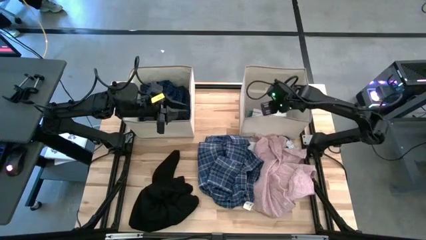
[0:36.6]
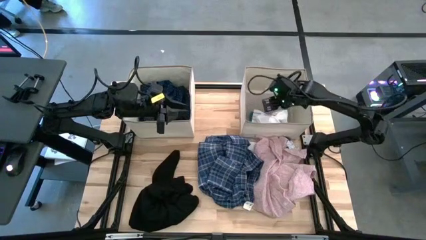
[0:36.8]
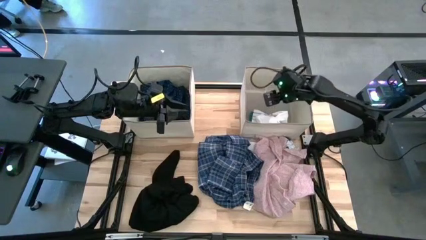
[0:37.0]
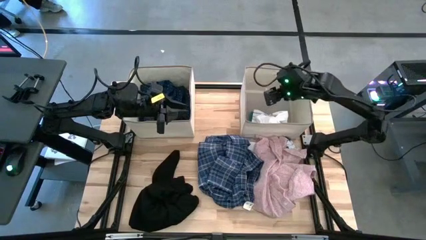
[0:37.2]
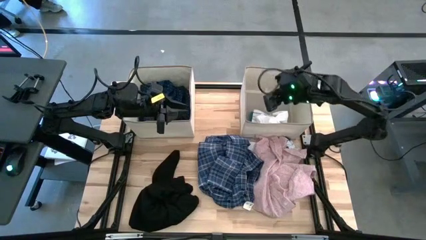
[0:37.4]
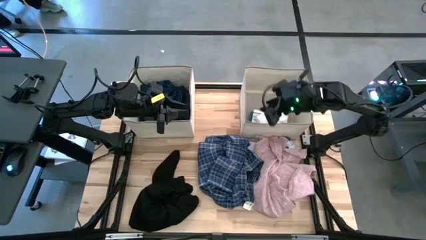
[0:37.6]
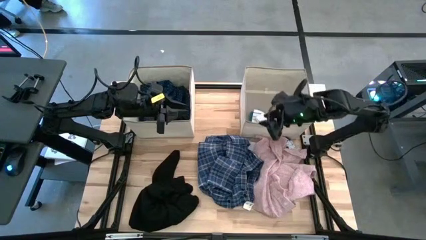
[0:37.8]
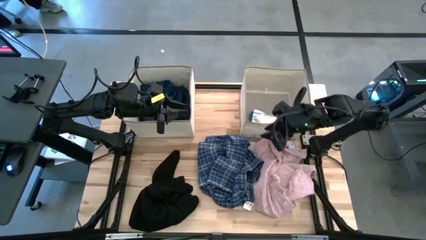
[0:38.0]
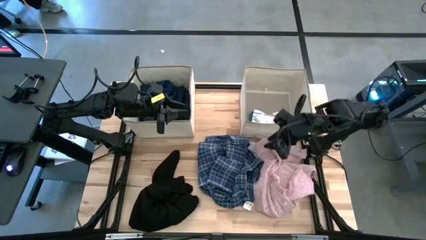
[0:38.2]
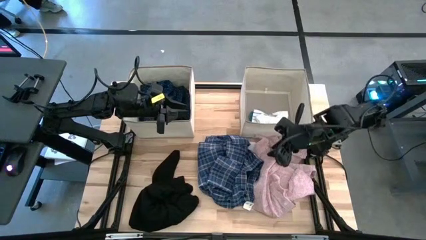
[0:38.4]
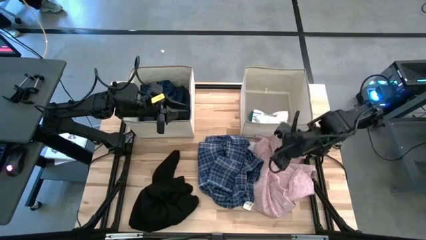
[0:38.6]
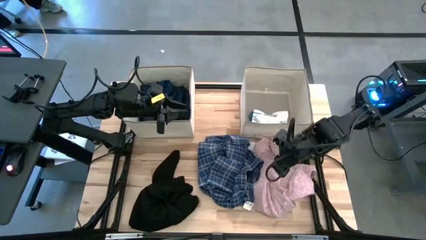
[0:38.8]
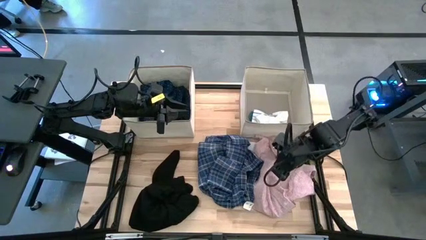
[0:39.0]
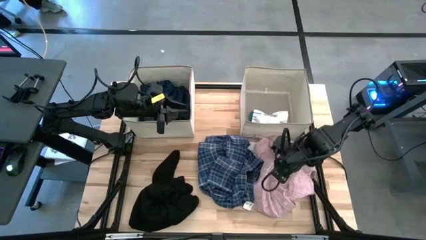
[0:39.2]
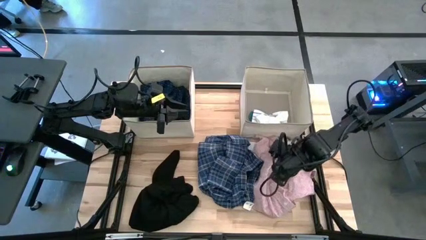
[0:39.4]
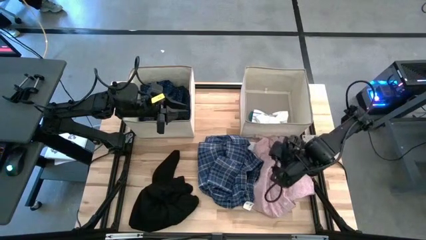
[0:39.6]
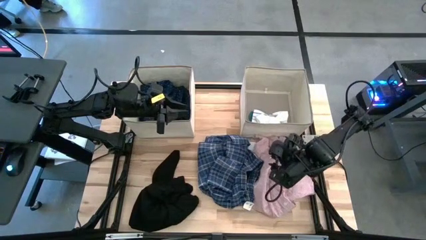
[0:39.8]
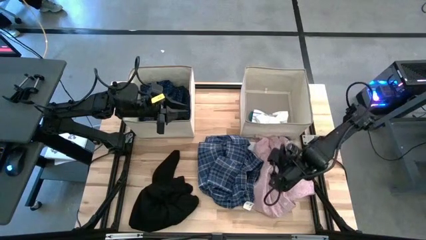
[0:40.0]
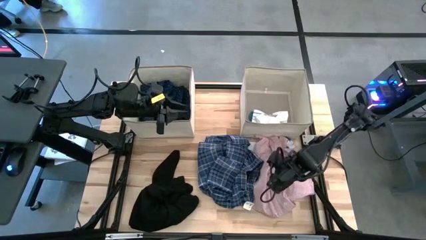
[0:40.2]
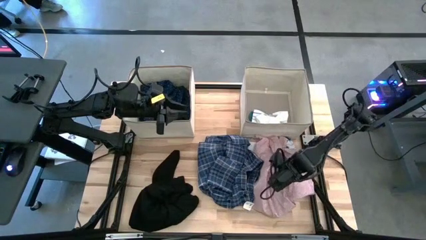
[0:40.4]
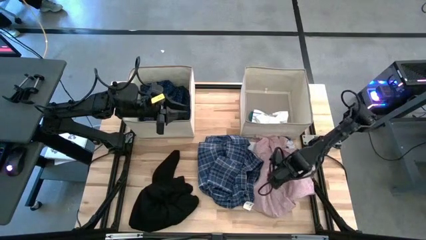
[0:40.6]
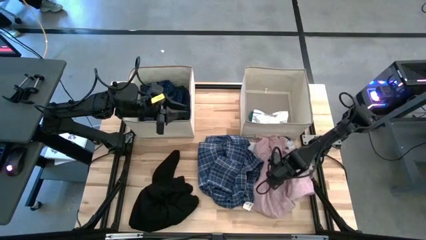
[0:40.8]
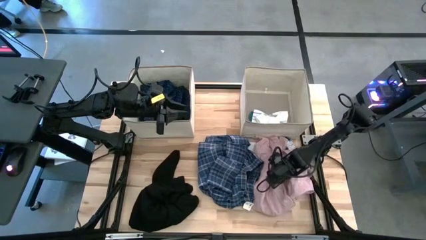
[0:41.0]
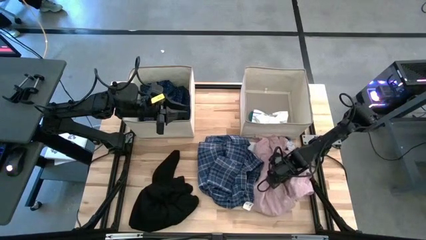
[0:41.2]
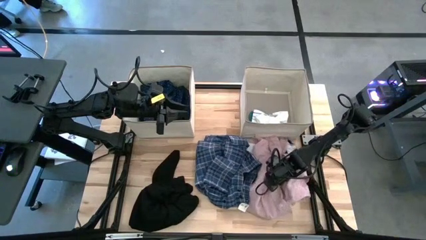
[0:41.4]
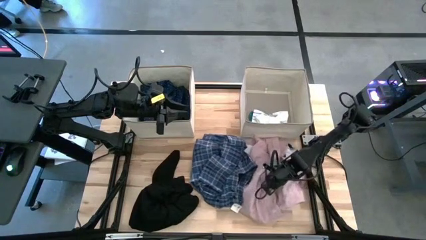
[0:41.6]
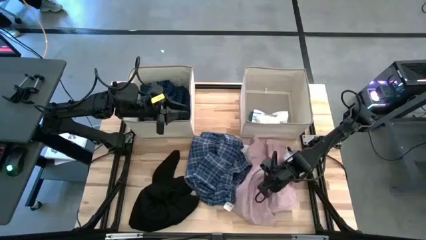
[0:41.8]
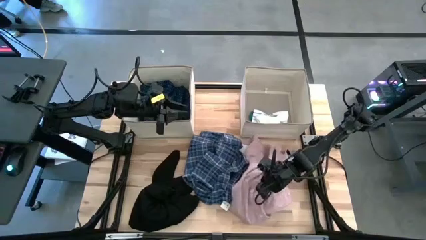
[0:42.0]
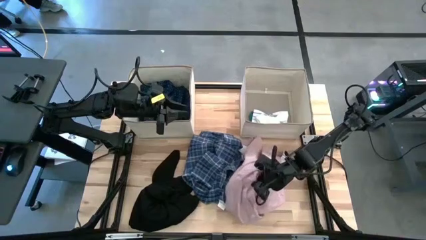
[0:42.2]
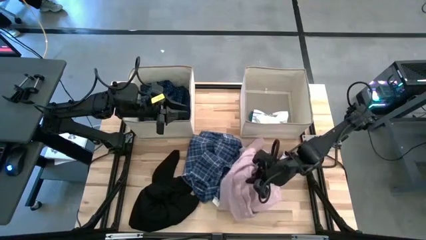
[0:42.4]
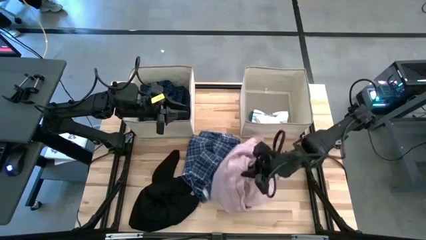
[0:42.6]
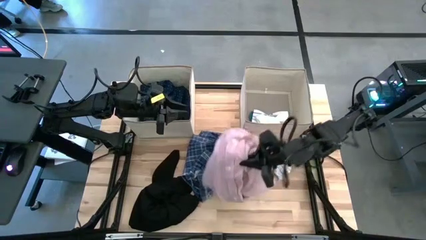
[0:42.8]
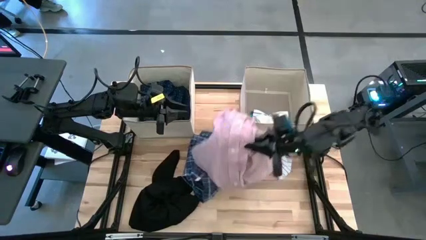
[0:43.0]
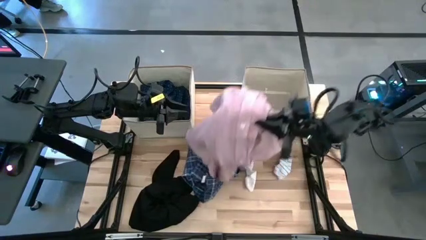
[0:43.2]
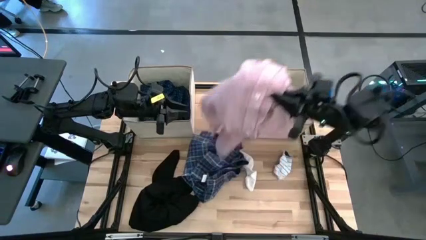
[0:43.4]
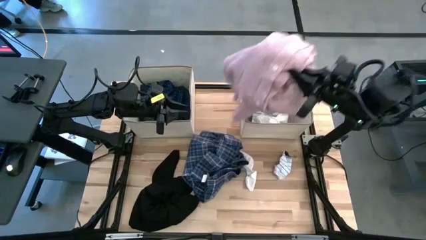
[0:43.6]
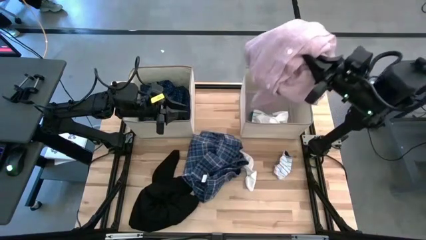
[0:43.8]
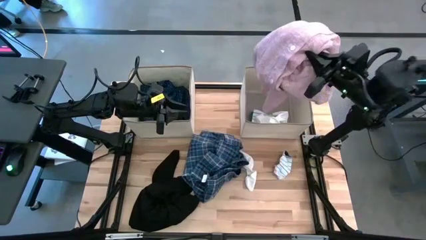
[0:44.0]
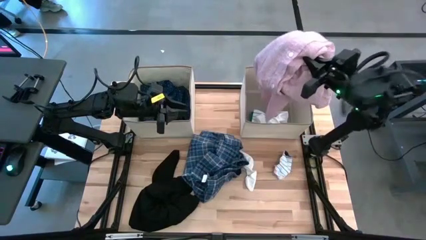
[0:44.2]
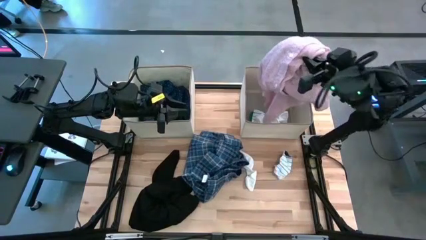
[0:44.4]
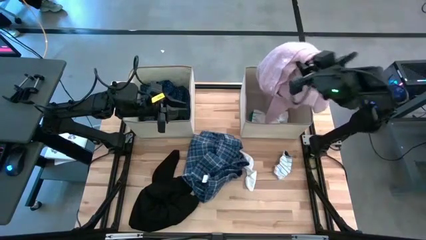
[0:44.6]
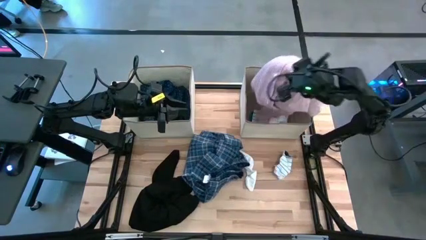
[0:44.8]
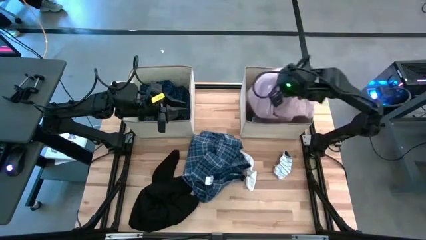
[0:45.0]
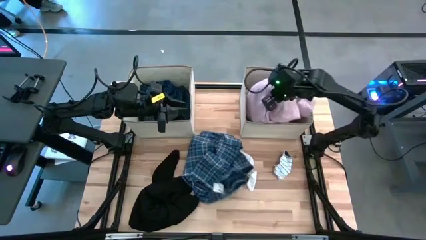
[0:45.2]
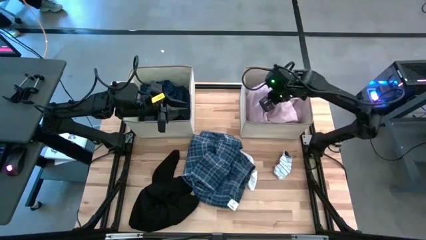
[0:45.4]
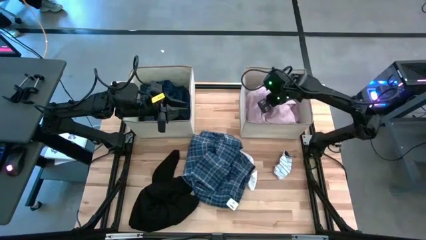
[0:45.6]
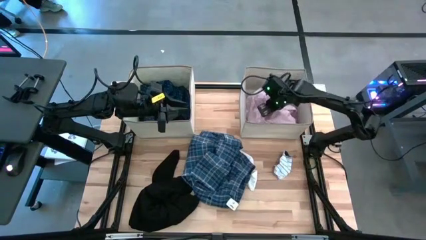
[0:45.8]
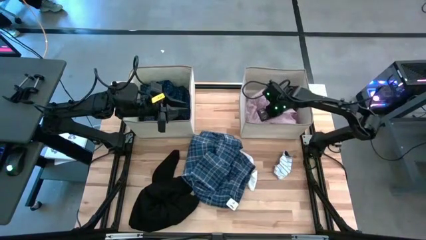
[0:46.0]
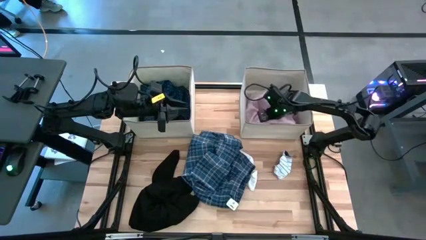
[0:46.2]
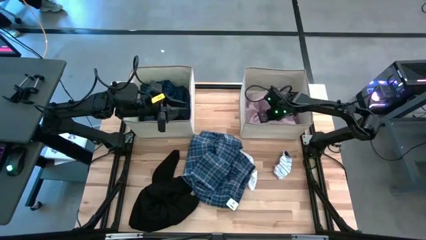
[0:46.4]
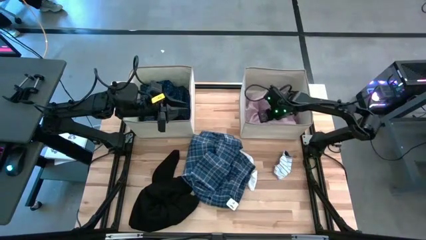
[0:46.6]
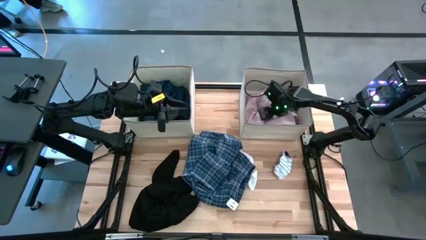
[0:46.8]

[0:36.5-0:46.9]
Task: Sort clothes
Put the pink shirt into the right laundry bin

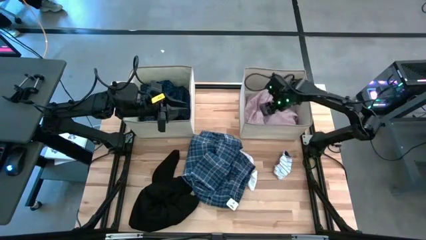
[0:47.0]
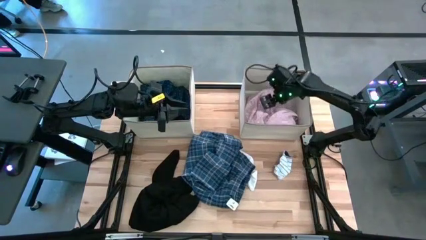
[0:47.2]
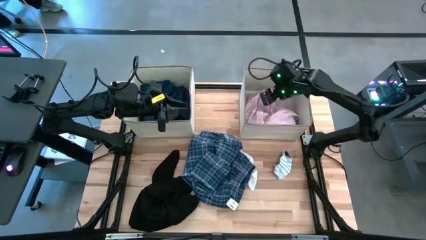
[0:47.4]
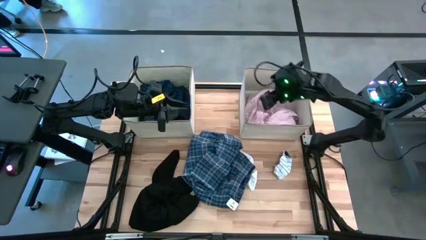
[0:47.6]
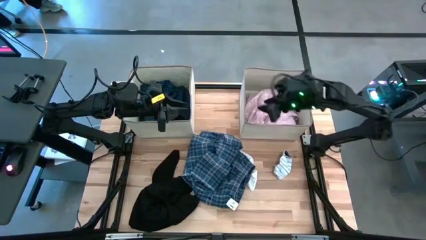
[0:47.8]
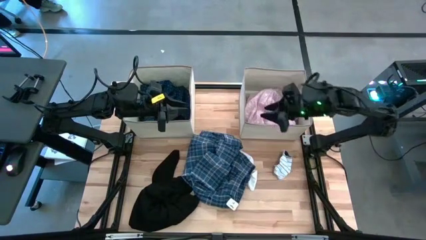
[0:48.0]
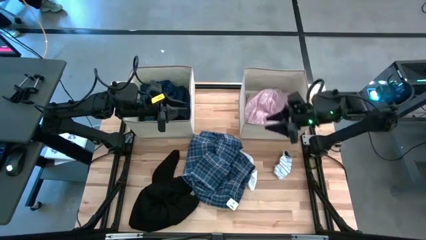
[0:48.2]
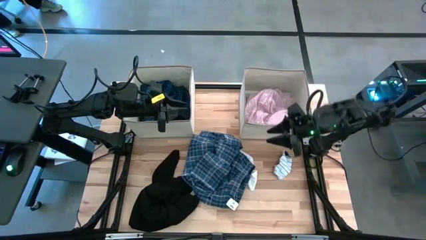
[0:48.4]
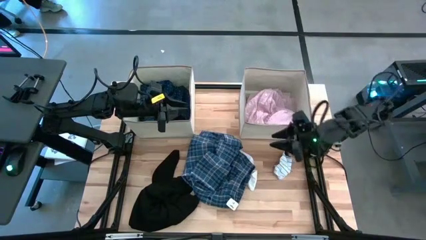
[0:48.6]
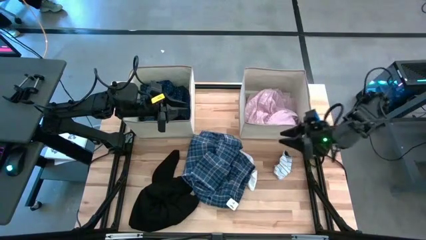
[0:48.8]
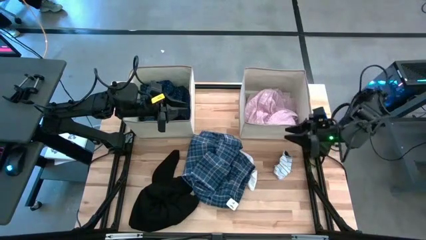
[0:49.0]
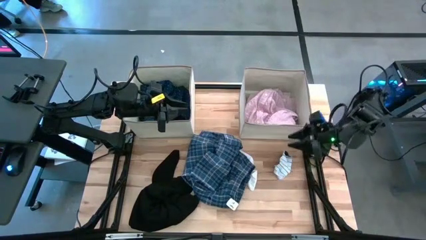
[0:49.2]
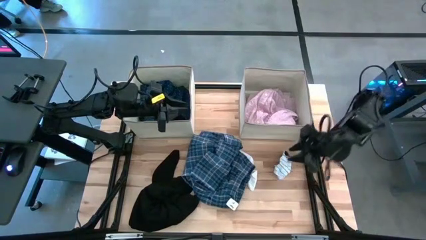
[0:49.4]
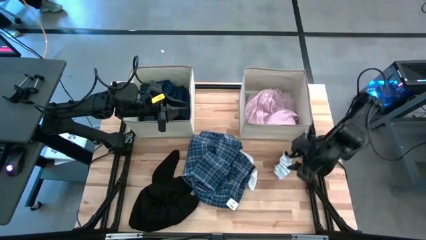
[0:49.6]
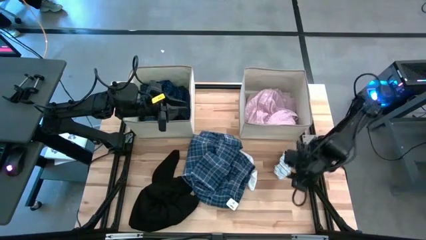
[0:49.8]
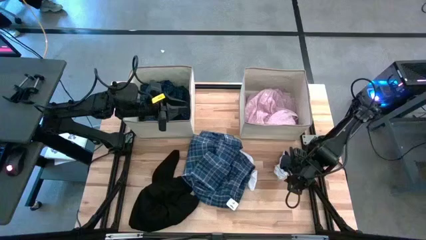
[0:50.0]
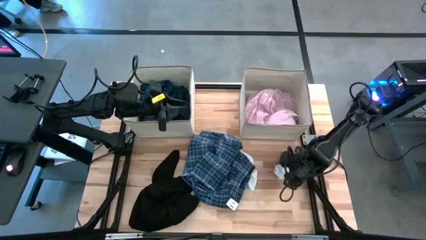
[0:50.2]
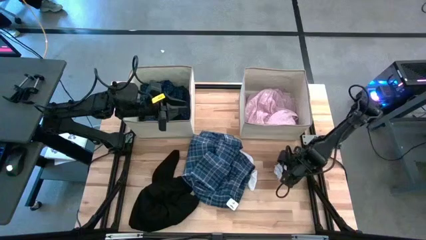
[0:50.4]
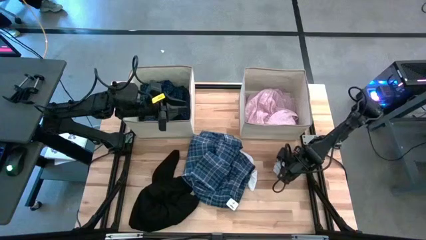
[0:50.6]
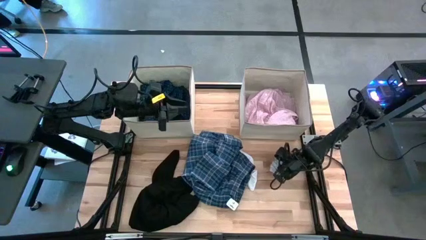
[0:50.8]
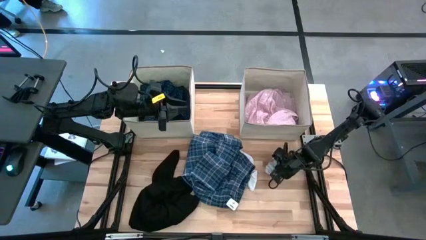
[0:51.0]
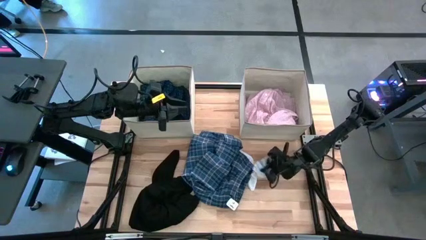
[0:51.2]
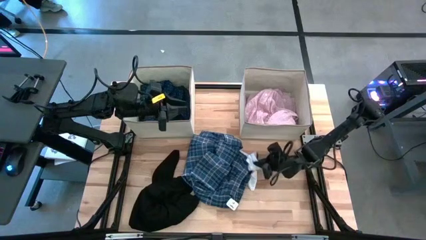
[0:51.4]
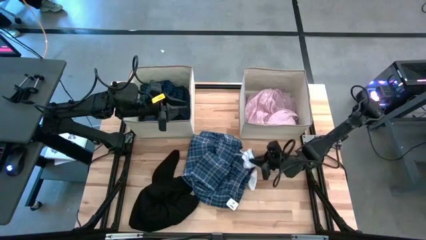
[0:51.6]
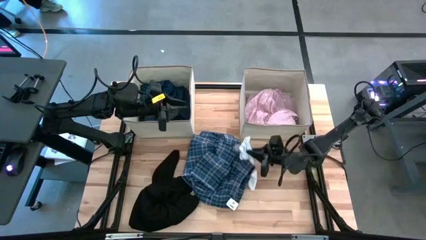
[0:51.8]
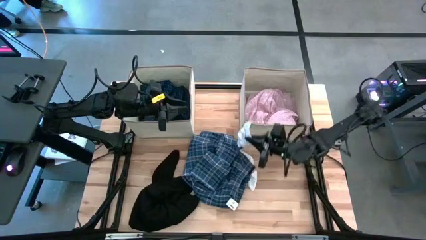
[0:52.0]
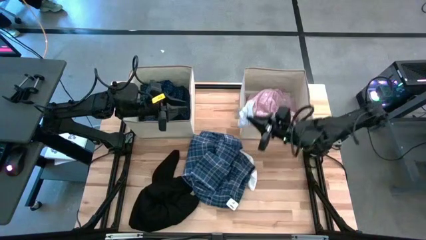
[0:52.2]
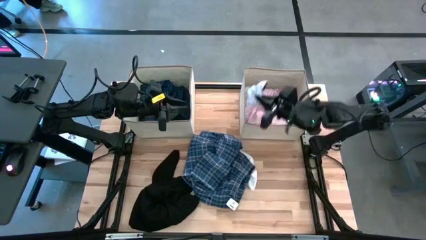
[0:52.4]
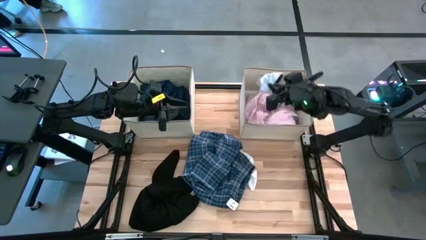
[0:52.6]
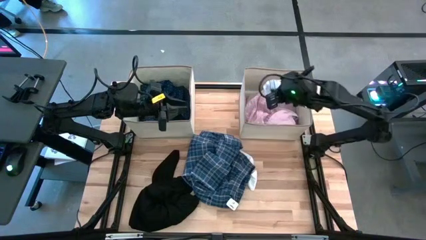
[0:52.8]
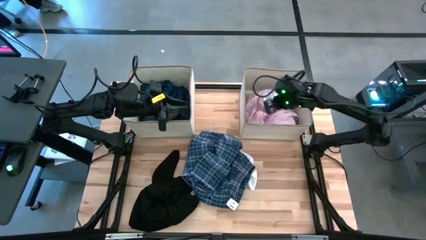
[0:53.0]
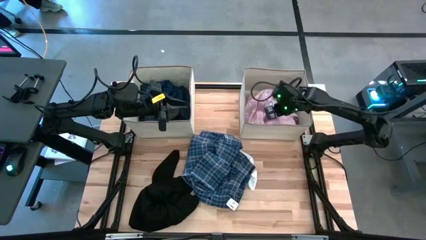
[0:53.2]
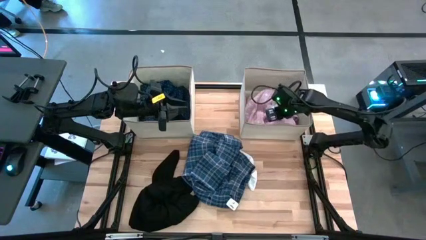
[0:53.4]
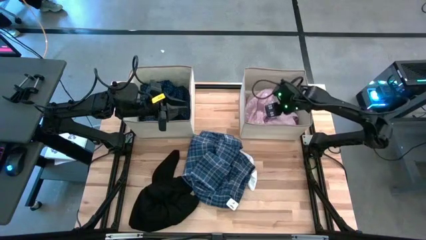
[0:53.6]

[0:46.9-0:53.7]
Put the white sock into the right laundry bin
